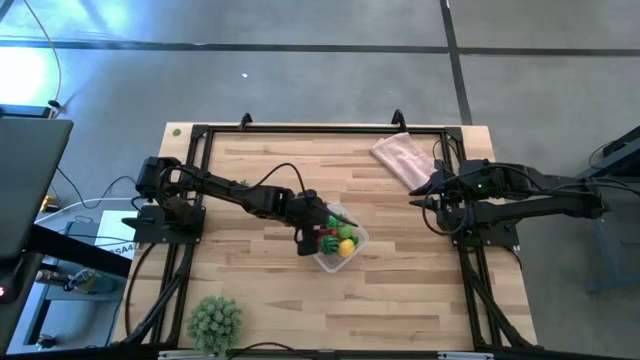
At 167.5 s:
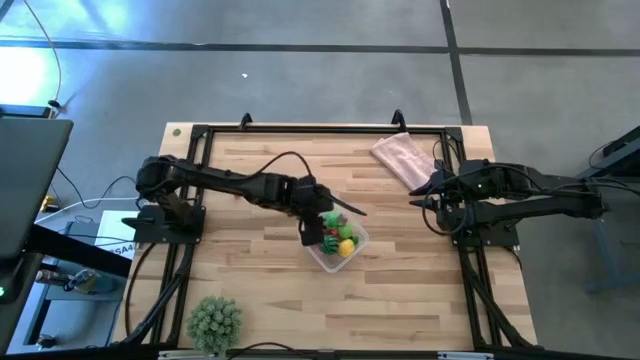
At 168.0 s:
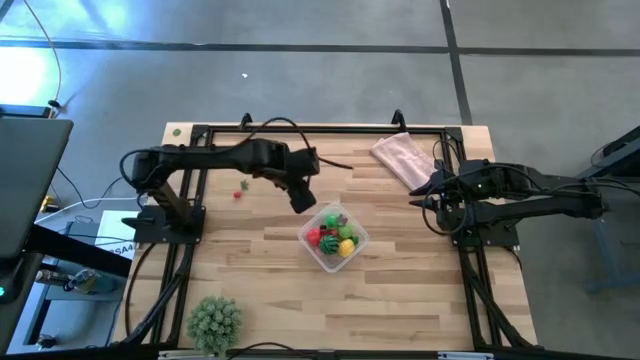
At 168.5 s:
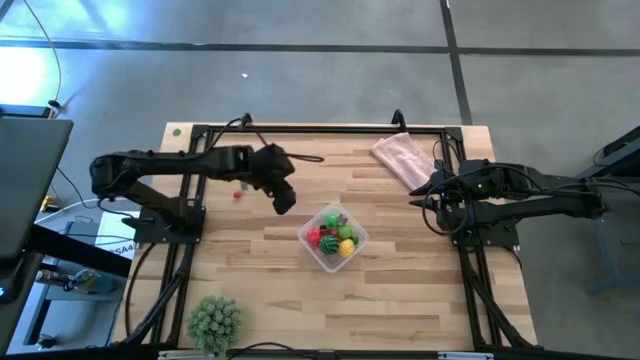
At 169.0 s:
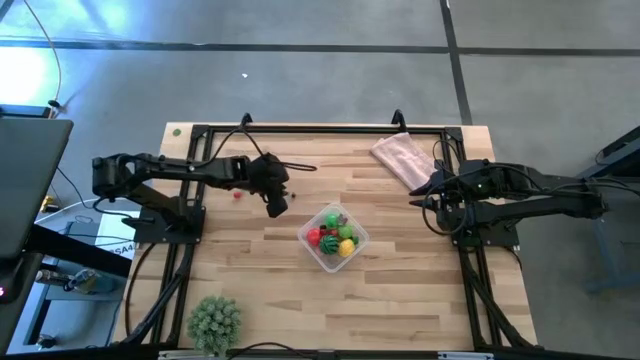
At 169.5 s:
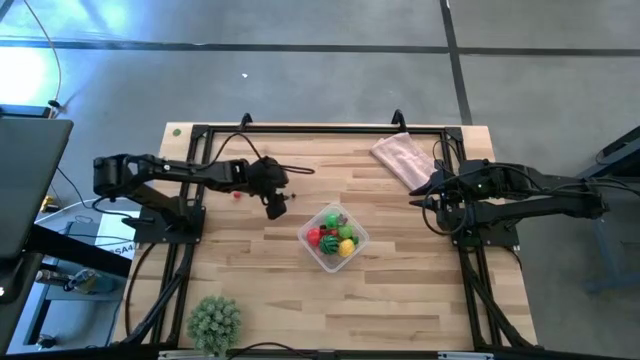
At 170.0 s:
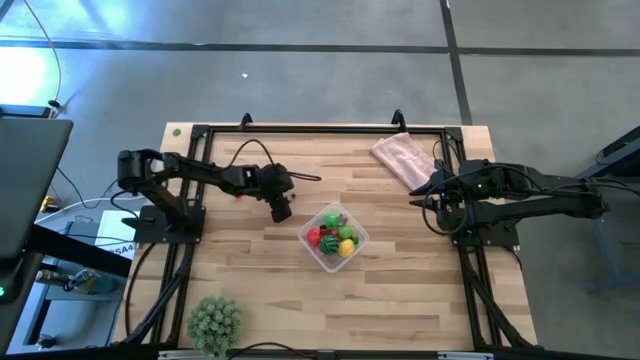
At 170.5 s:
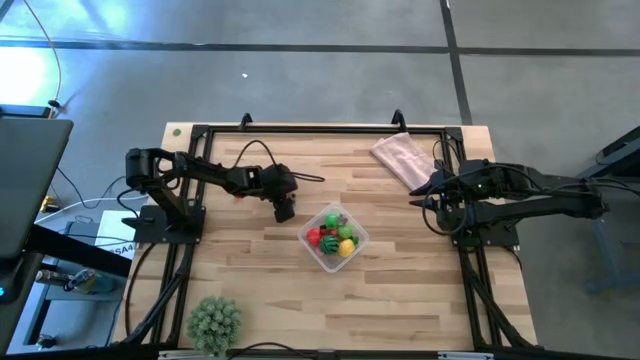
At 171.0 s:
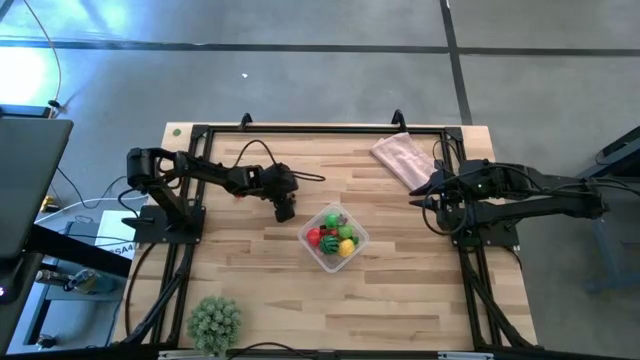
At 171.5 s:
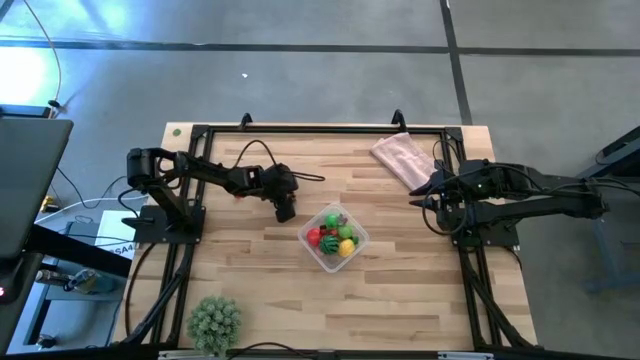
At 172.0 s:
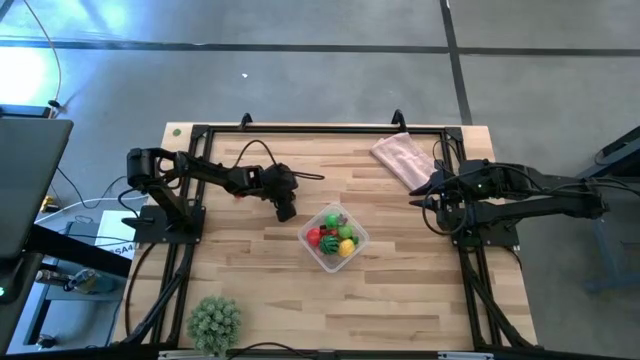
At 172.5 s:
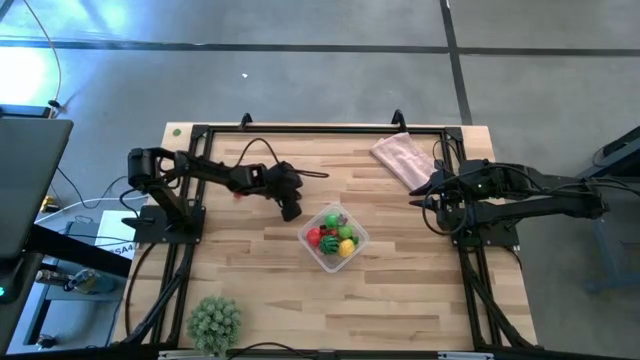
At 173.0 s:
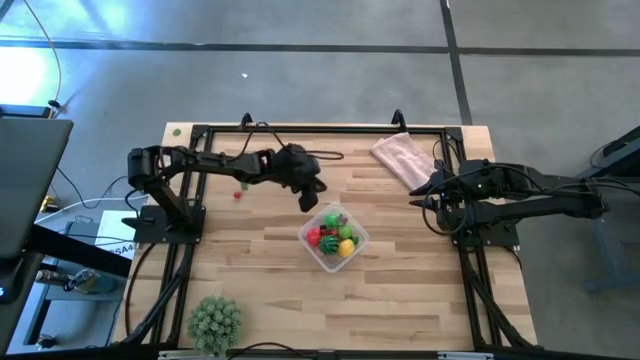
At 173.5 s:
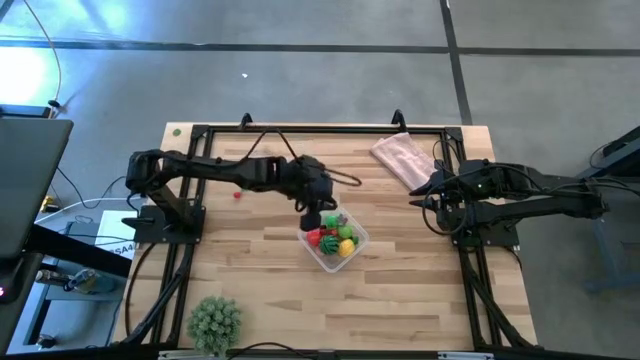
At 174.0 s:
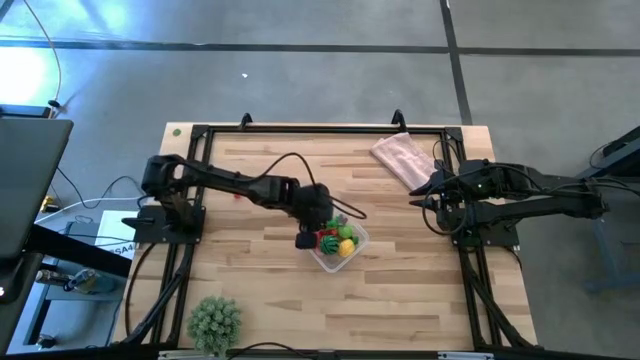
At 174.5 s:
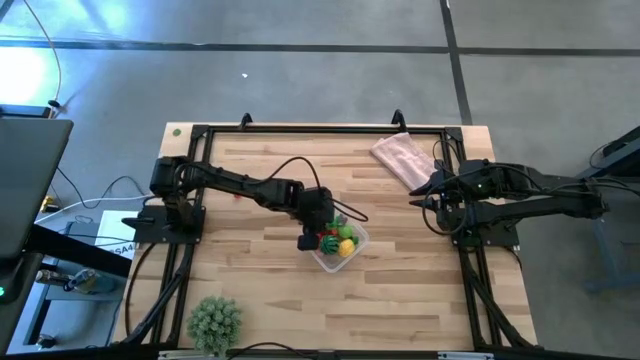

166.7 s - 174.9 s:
Task: Pick and placing Produce into tupperware
Put the blueberry into the transparent container

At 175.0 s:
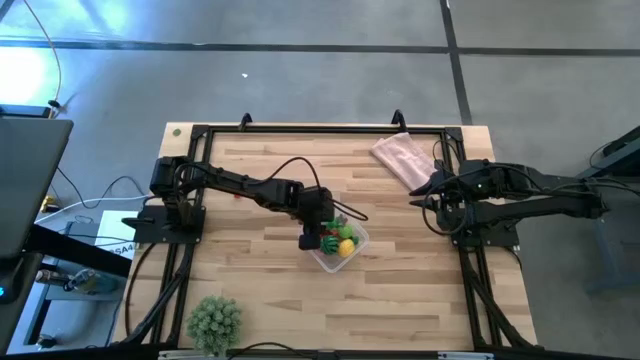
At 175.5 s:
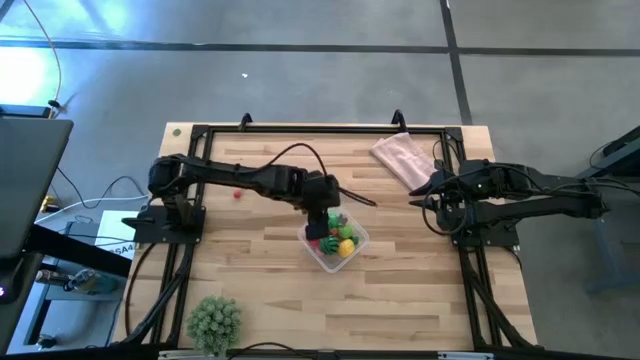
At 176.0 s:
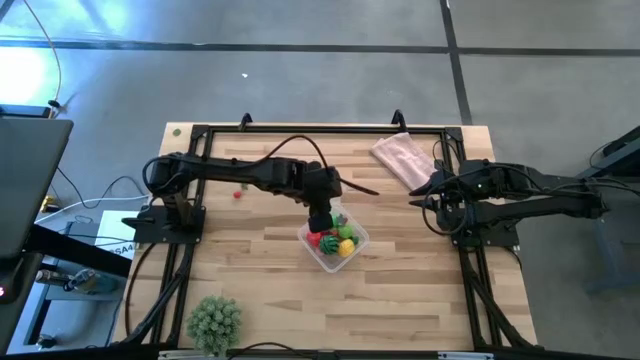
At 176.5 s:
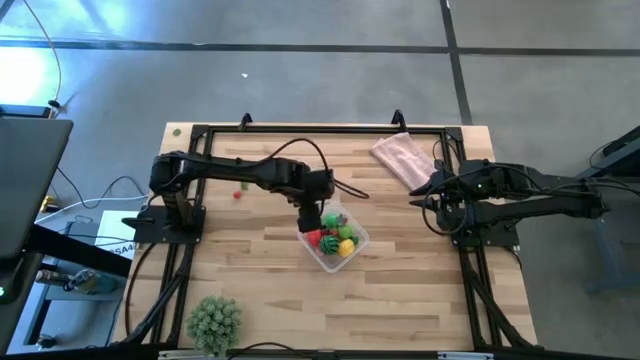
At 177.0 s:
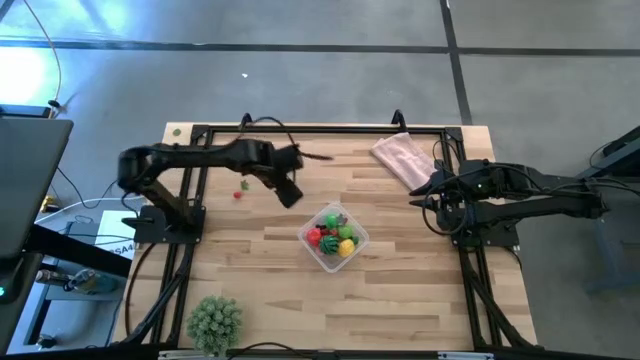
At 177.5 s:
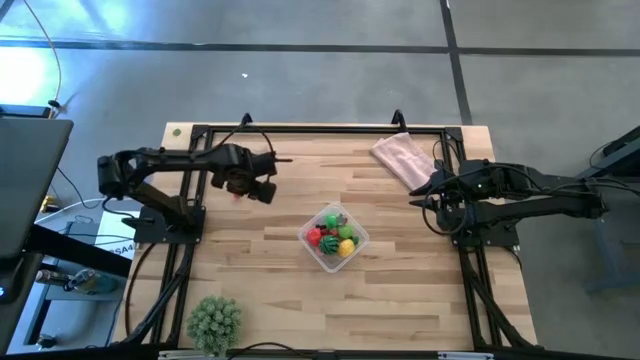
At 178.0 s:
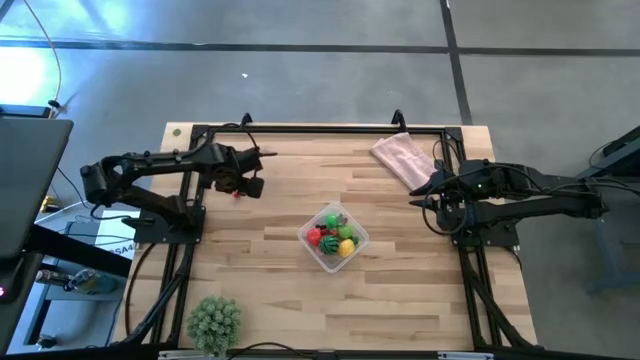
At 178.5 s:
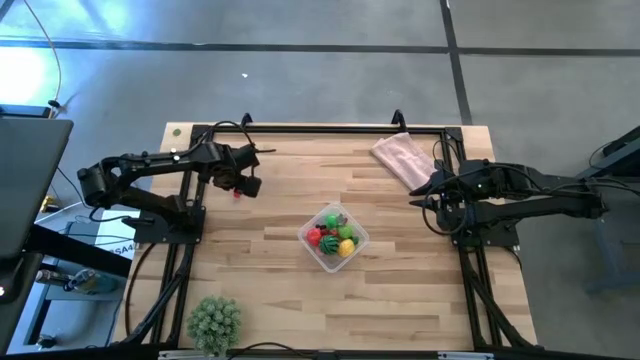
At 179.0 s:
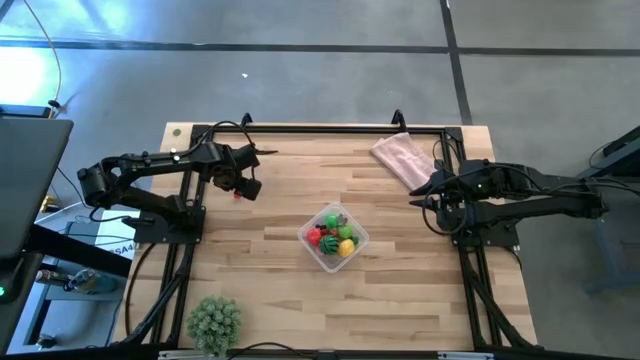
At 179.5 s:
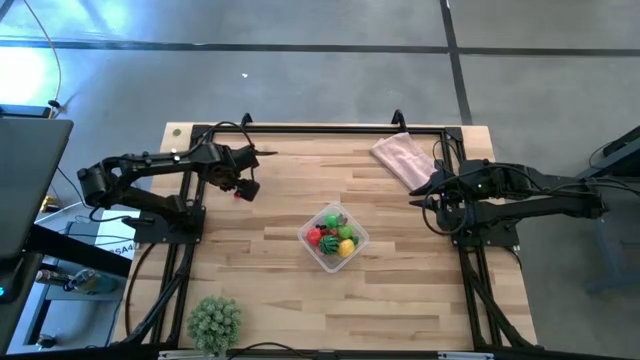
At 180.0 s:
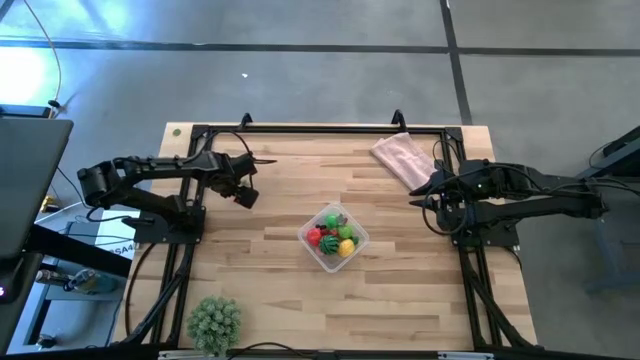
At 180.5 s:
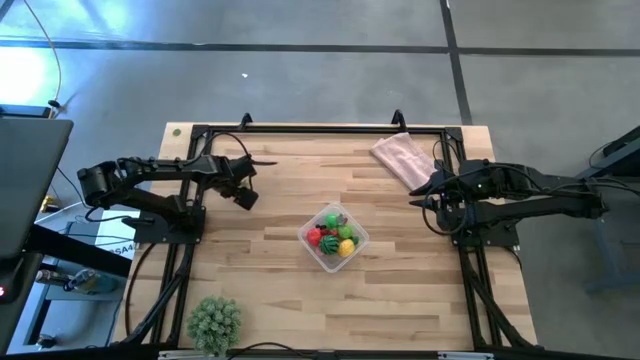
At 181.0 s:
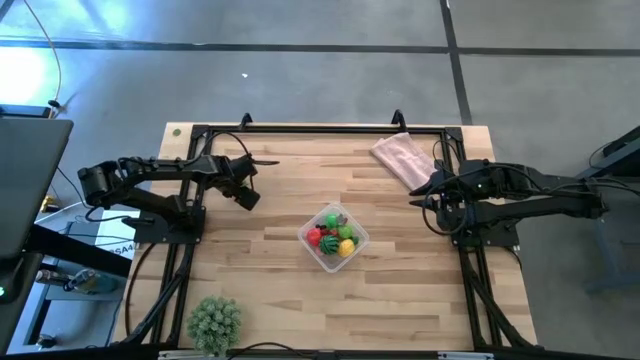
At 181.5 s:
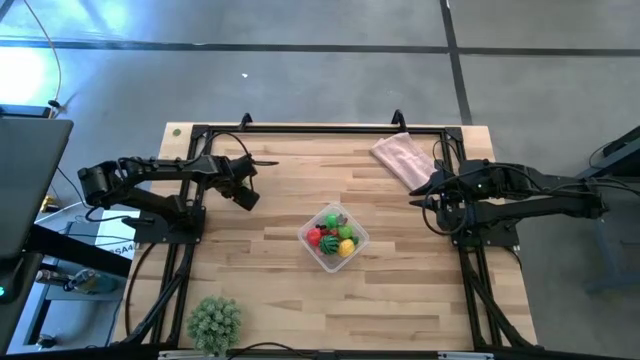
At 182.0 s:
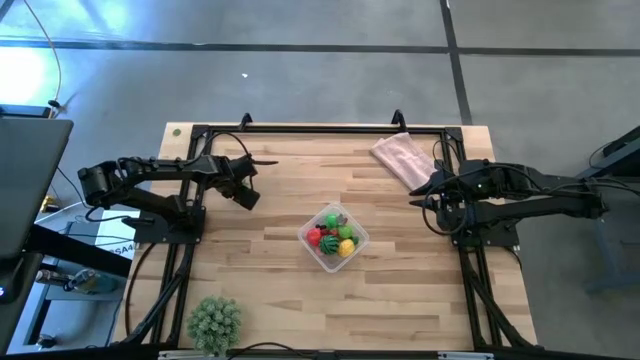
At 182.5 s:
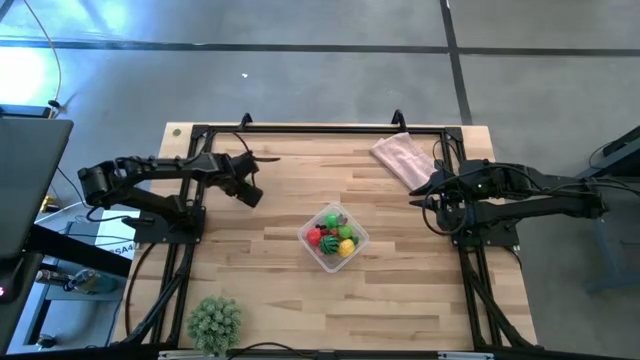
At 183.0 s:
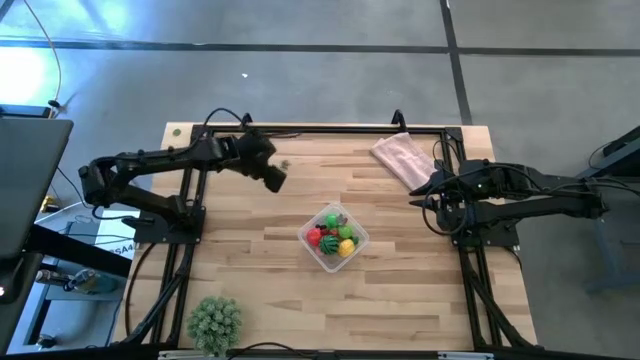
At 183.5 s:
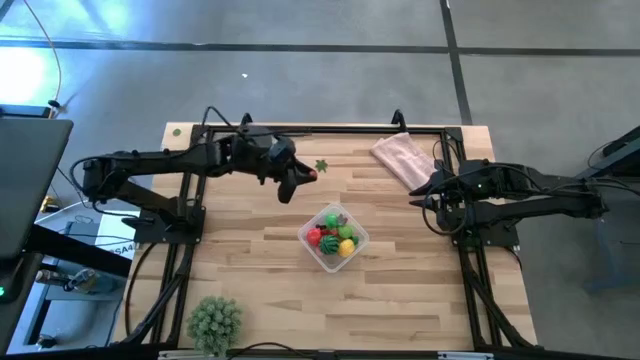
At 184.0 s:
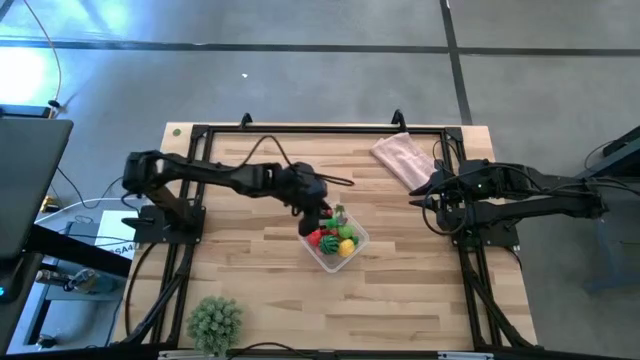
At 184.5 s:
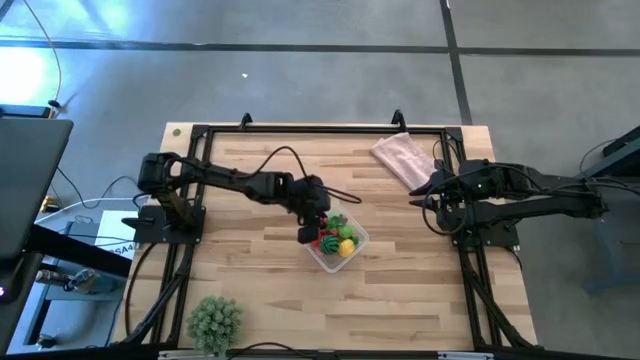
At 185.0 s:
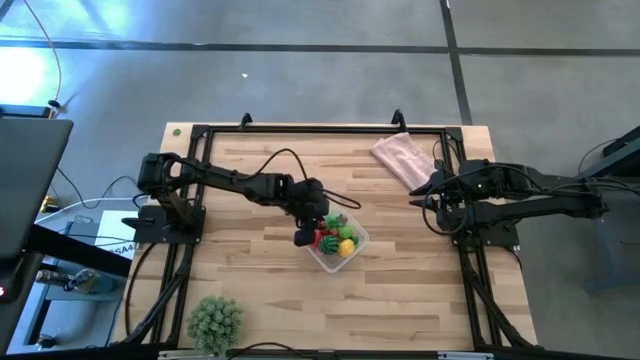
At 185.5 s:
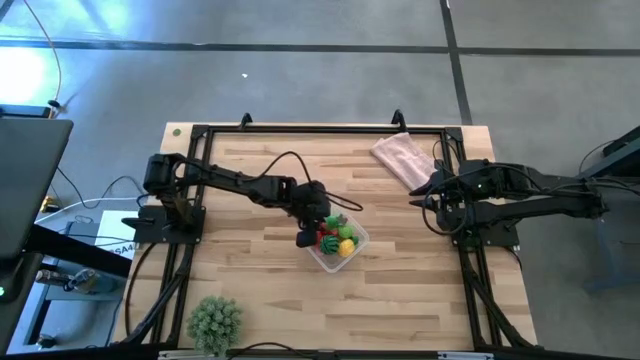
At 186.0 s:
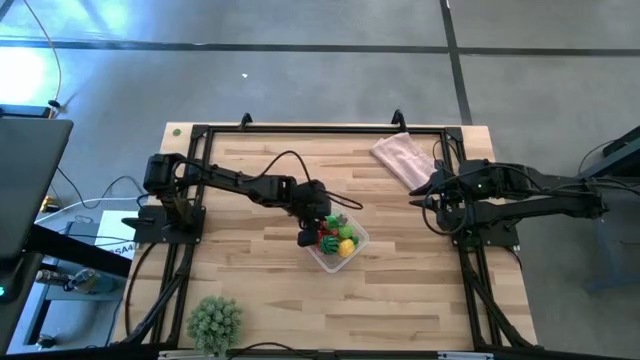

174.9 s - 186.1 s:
Put the red cherry into the transparent container
